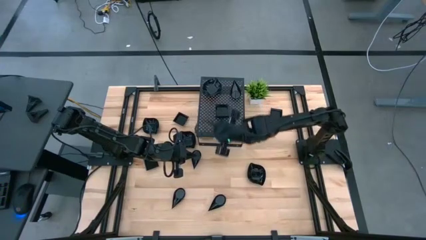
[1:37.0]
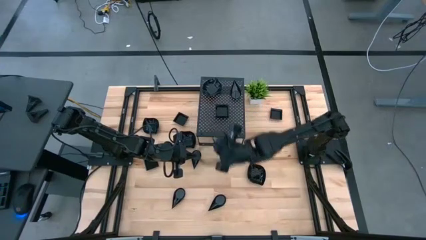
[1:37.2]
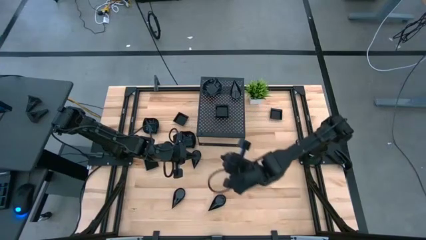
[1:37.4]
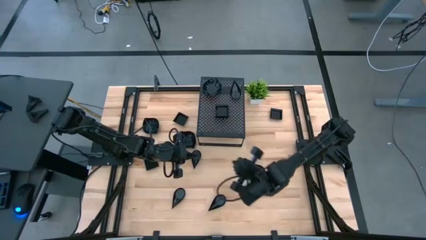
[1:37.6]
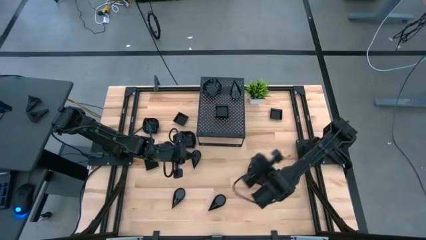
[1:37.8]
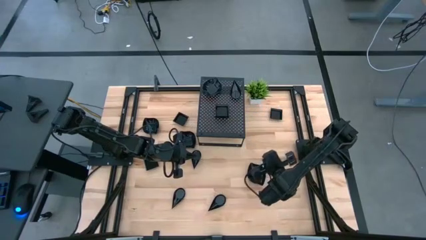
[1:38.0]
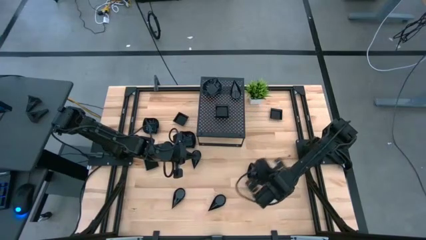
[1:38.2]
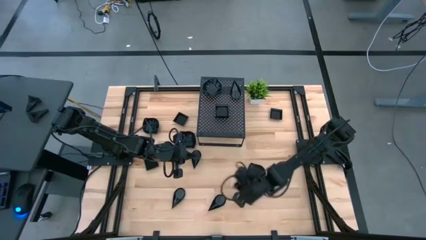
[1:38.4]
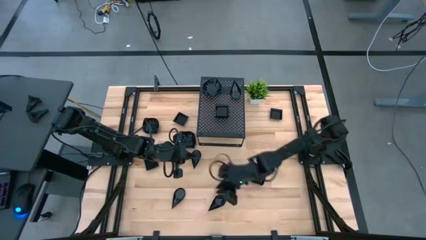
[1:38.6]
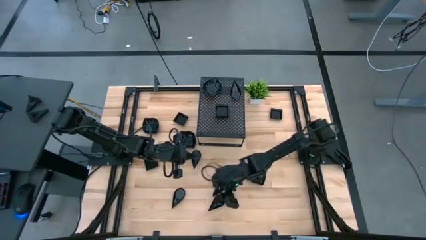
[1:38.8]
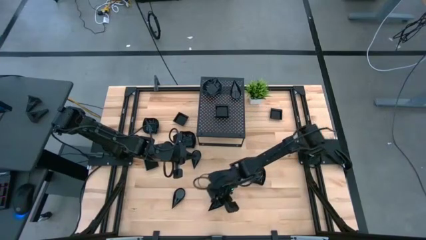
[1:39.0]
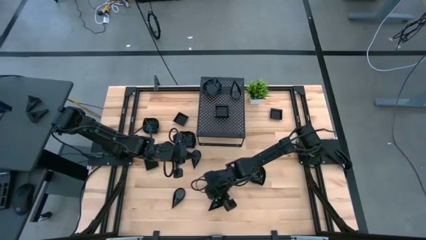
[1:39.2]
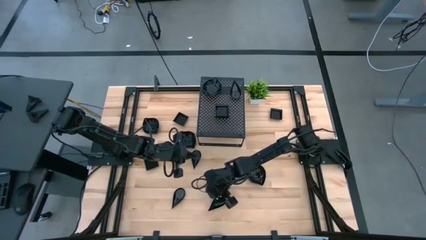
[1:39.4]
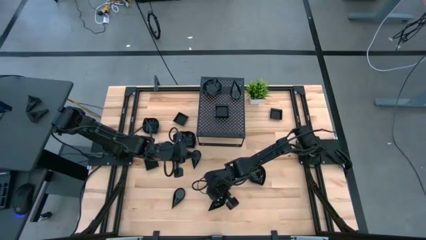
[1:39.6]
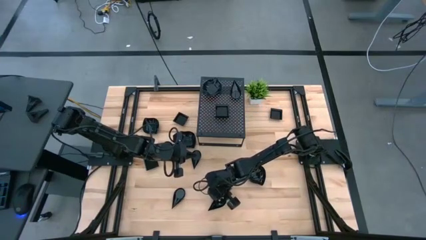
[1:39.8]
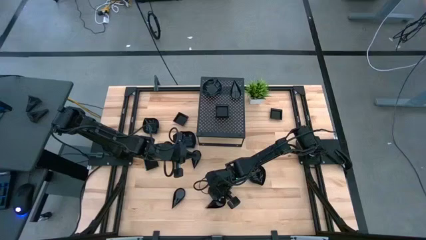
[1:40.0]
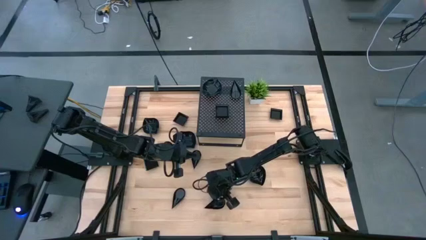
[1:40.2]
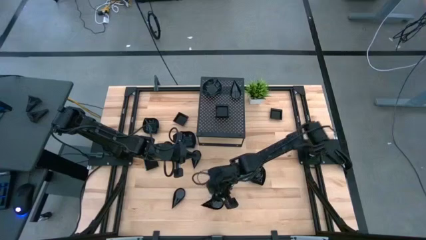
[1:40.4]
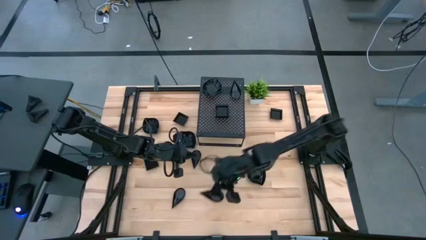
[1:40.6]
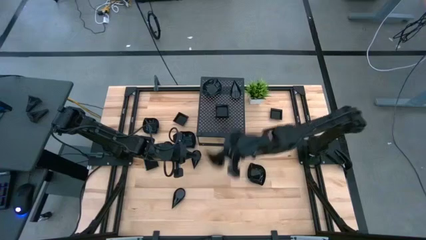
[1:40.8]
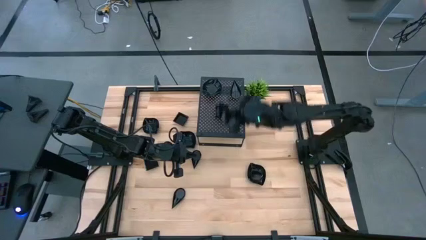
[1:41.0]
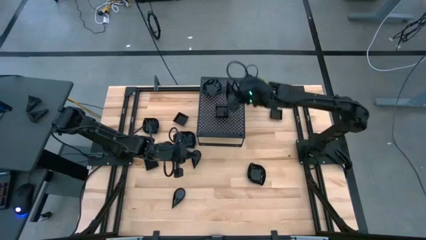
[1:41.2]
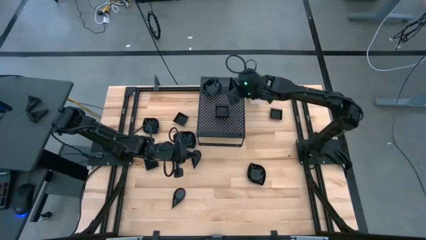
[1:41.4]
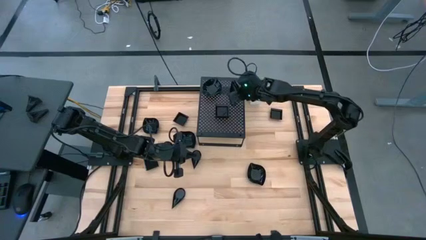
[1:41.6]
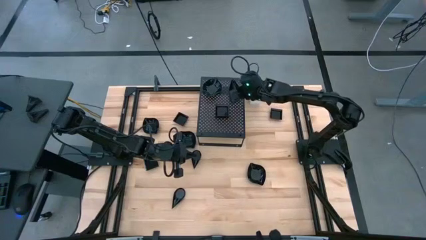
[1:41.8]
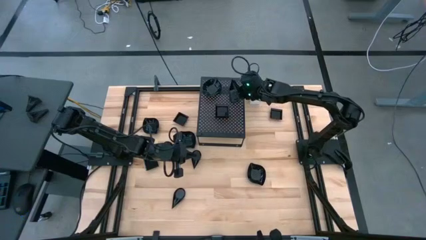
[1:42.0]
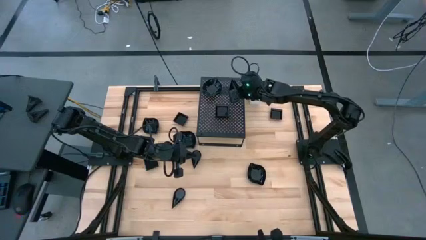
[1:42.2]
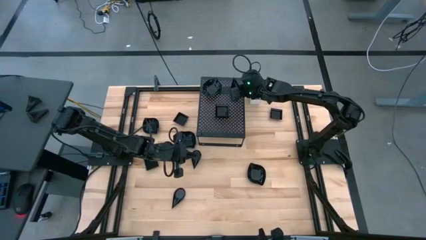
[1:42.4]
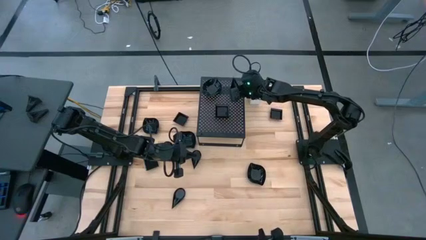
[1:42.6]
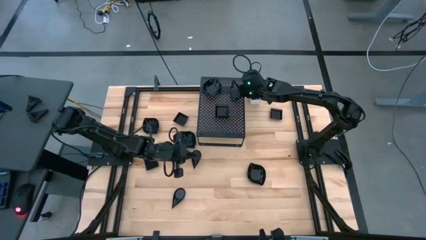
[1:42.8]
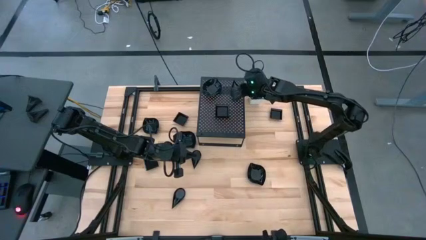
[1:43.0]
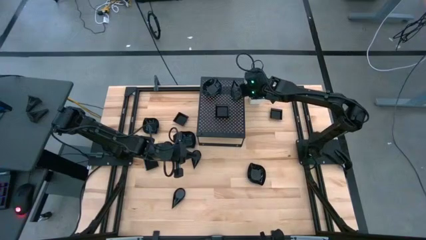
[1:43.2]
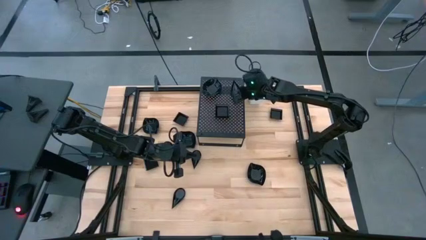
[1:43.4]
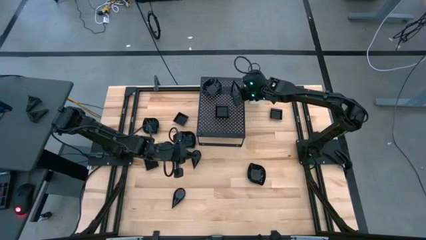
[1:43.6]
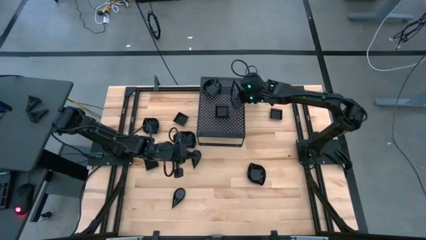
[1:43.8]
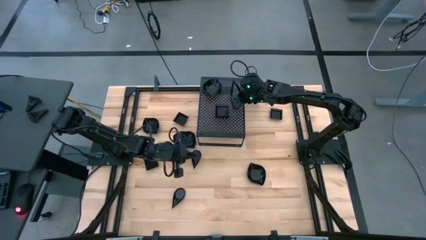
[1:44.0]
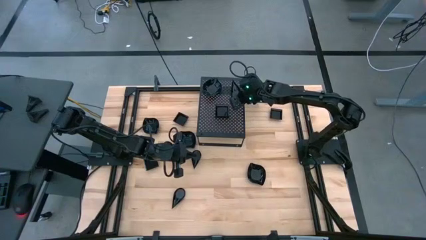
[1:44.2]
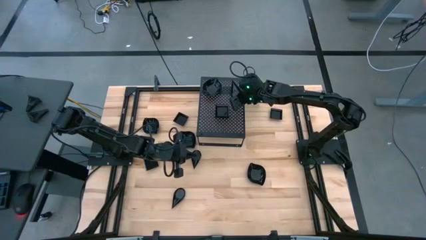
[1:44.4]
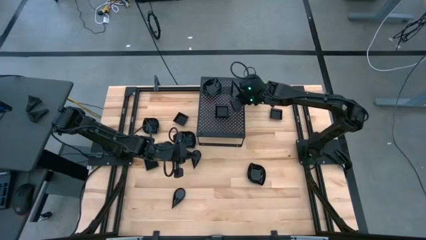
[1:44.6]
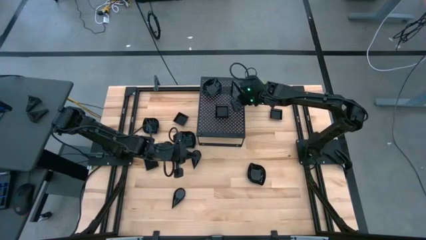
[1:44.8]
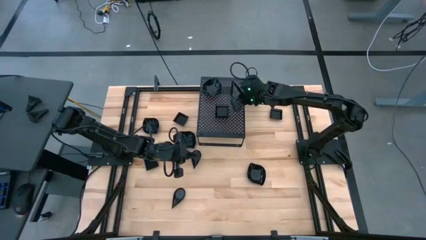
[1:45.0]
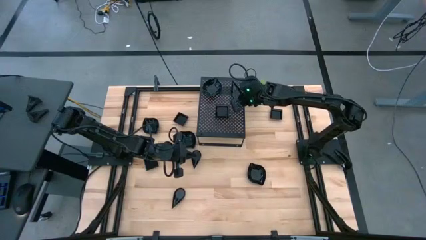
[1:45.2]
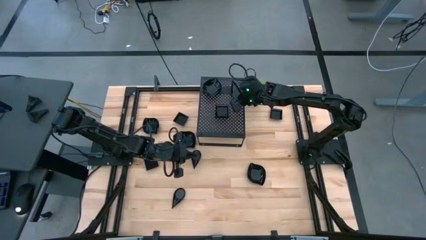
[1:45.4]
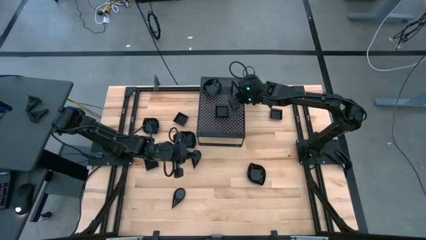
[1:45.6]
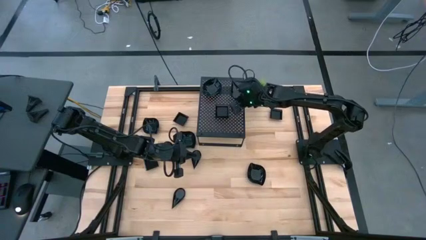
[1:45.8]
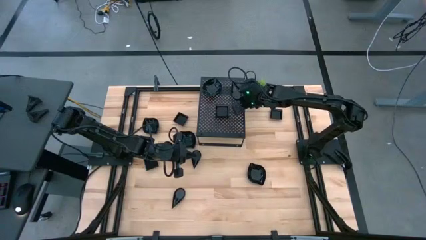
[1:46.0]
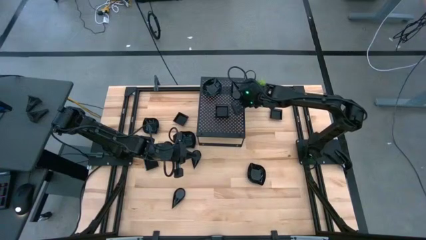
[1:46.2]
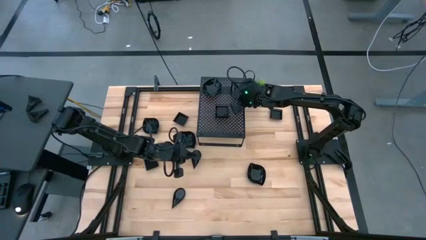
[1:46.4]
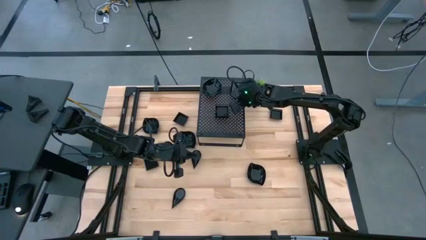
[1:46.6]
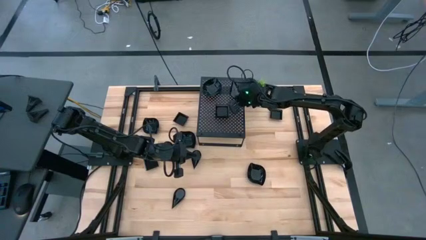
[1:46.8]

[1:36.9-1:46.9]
Task: Pick & Place Mini shaped plates
Stack the black drop-shaped plate on top of the black drop-shaped plates on the shelf

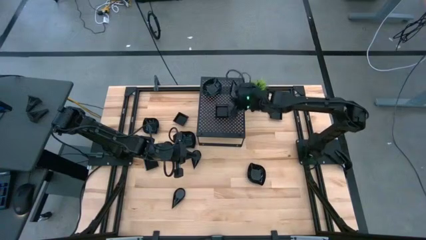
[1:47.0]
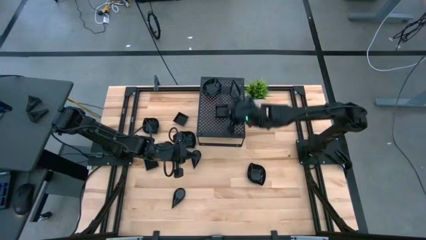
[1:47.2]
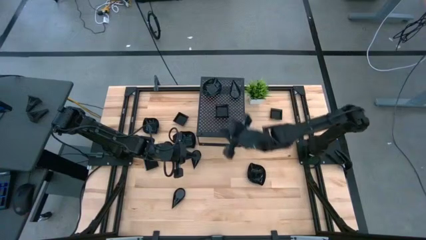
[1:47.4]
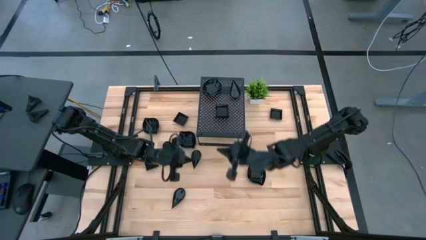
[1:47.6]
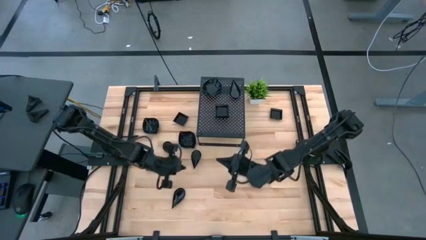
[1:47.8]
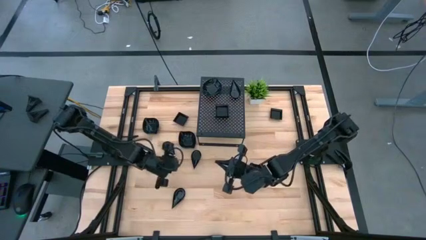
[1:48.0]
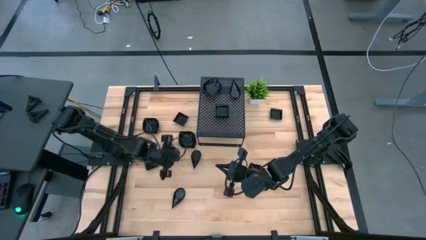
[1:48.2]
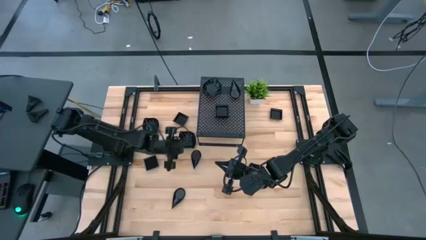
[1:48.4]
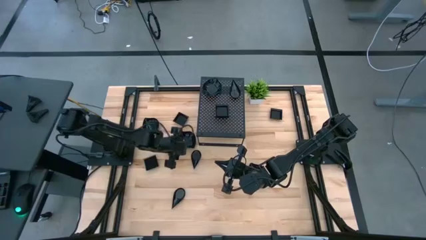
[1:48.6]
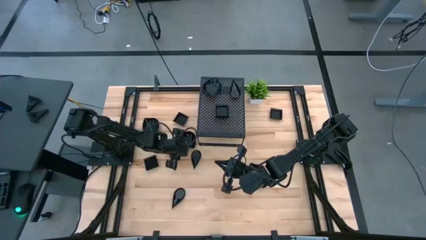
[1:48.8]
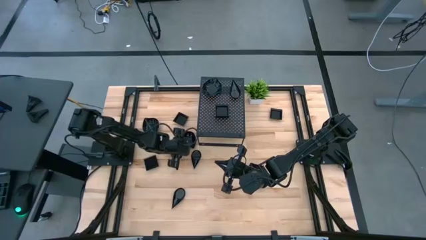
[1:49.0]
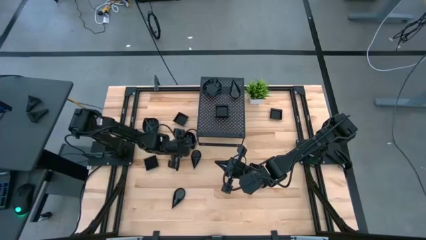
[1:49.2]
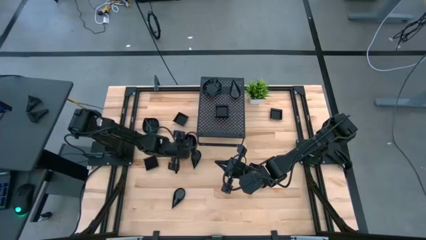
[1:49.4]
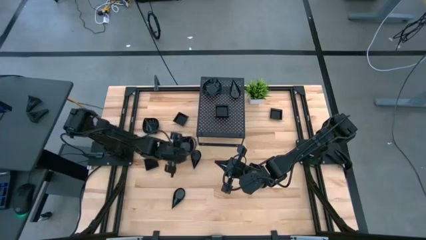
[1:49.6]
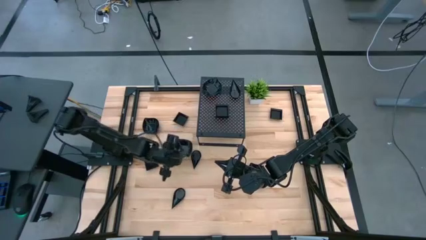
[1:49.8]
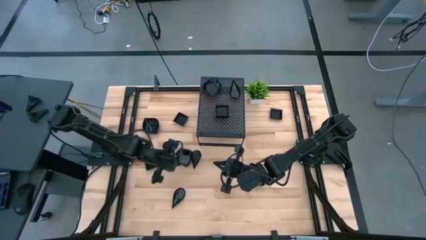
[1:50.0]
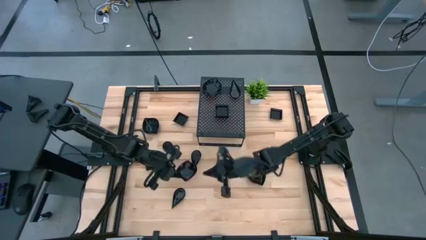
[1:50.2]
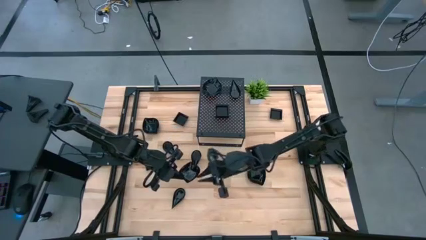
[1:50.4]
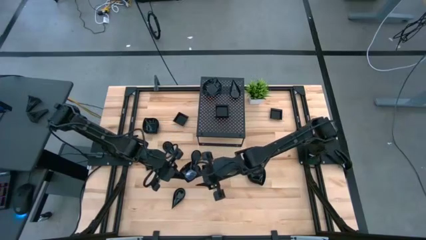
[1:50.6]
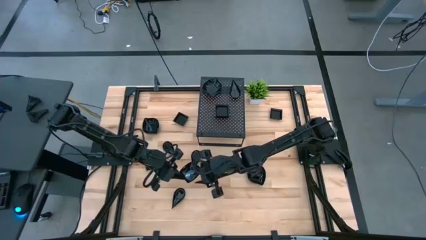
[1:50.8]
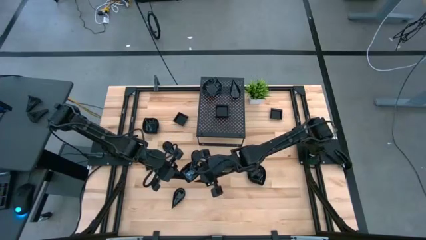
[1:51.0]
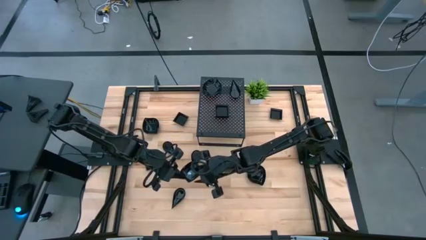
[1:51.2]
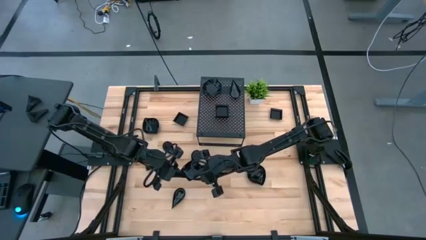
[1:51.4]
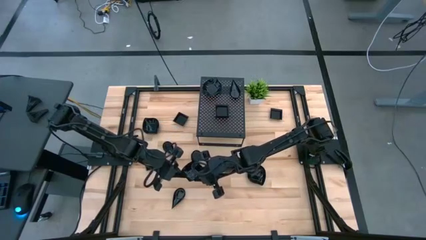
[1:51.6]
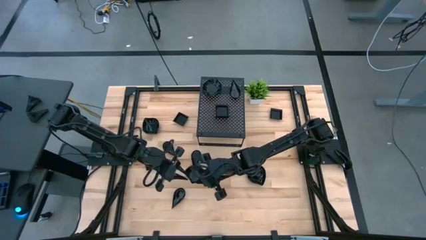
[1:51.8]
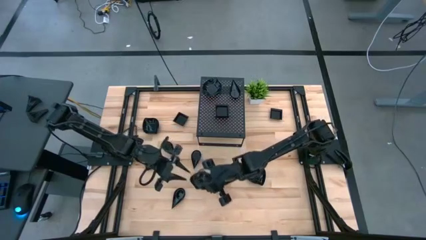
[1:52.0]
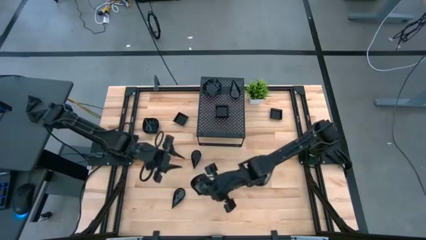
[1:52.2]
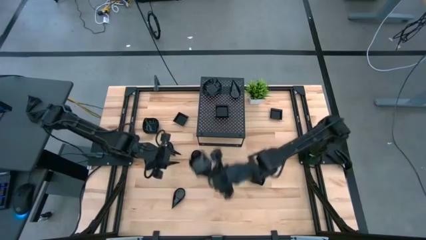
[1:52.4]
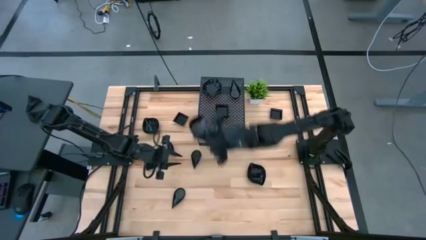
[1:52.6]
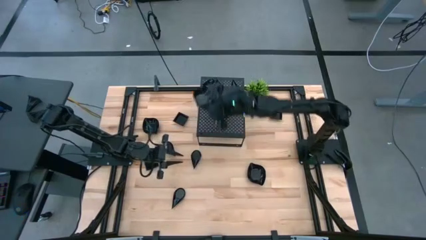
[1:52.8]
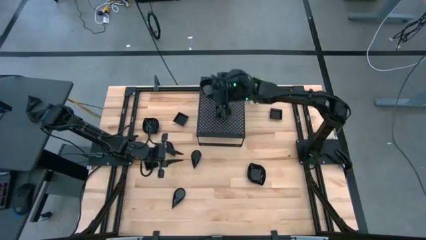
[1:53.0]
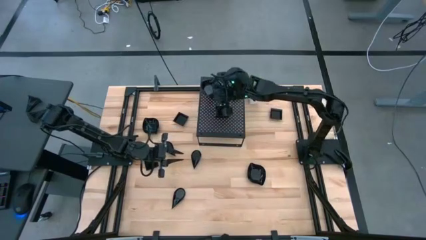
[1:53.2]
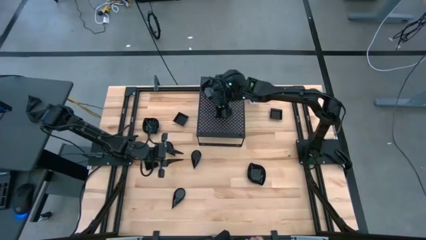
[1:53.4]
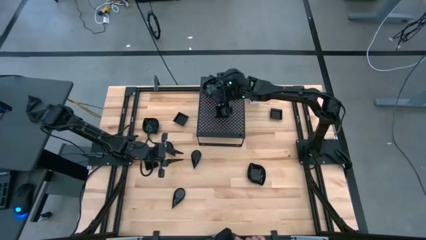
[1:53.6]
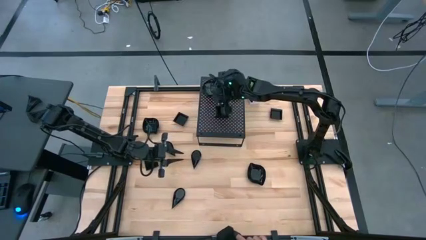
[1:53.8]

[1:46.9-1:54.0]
Stack the black leaf-shaped plate on top of the black leaf-shaped plates on the shelf
